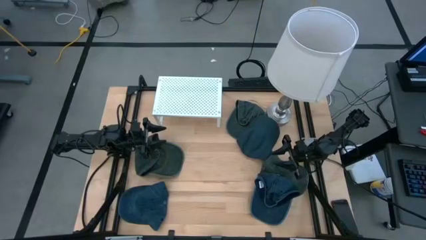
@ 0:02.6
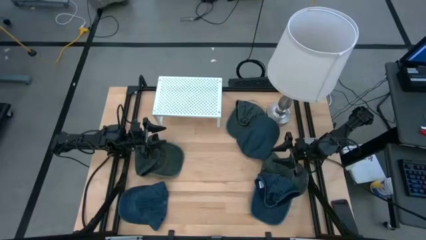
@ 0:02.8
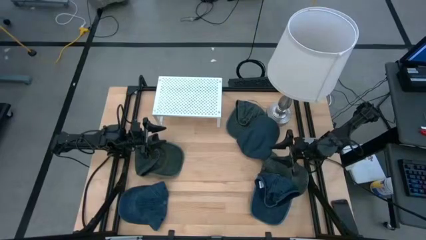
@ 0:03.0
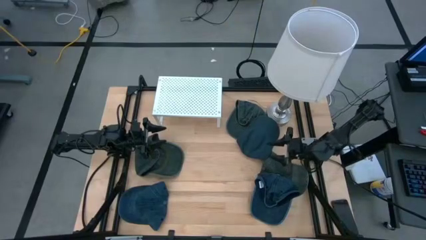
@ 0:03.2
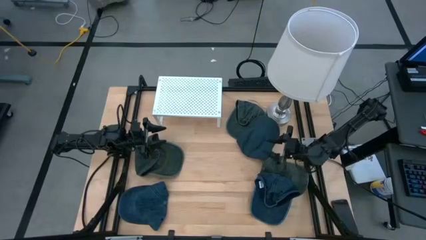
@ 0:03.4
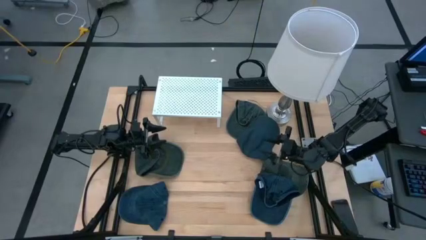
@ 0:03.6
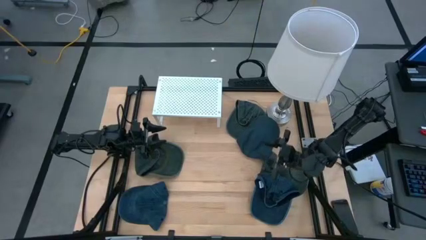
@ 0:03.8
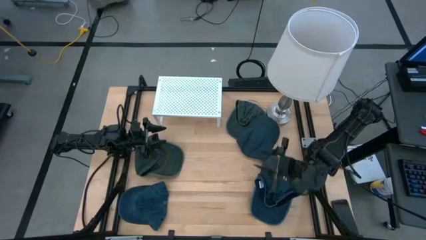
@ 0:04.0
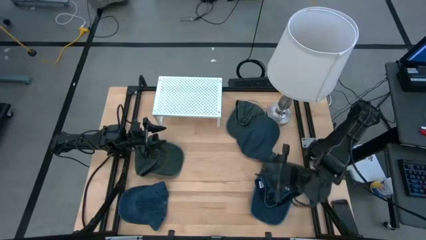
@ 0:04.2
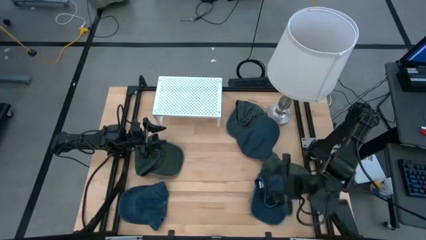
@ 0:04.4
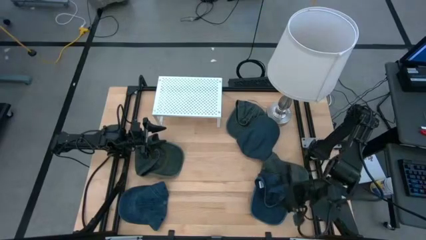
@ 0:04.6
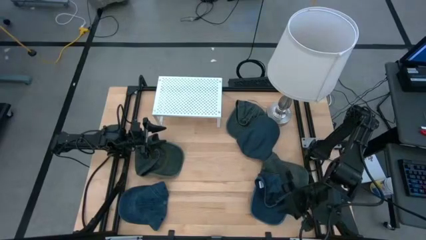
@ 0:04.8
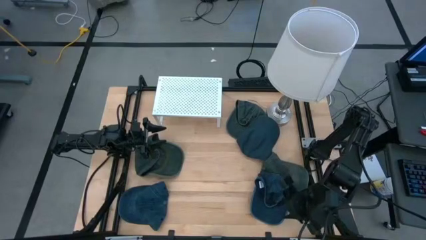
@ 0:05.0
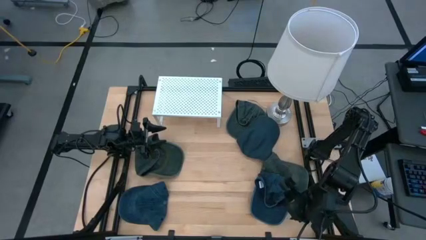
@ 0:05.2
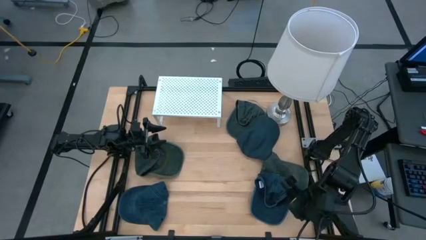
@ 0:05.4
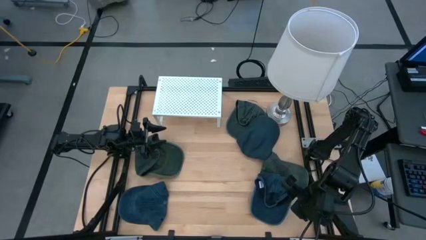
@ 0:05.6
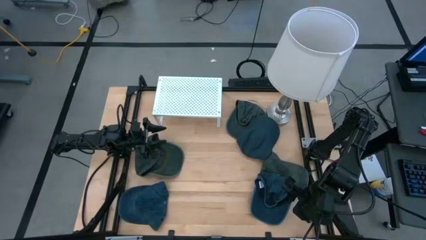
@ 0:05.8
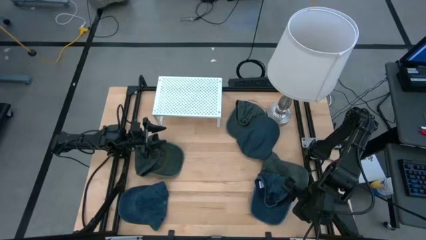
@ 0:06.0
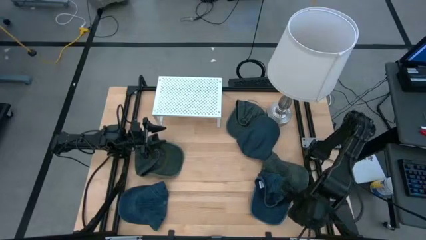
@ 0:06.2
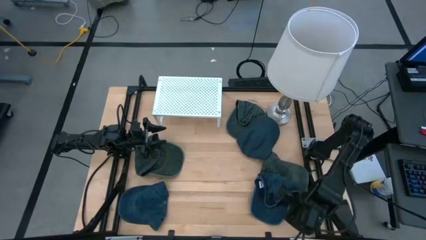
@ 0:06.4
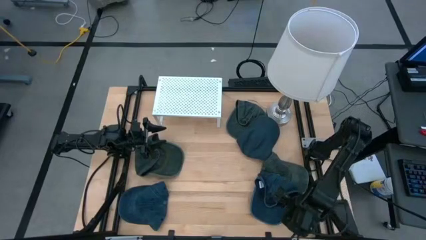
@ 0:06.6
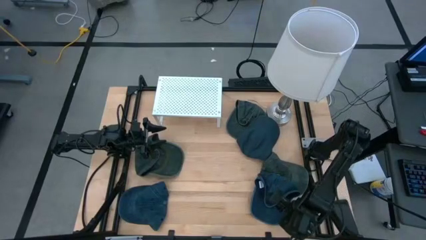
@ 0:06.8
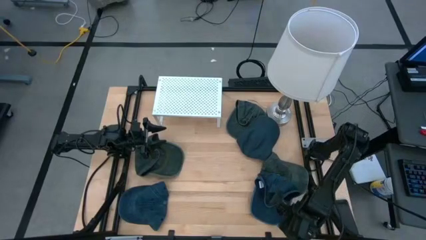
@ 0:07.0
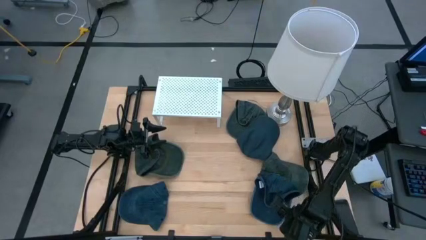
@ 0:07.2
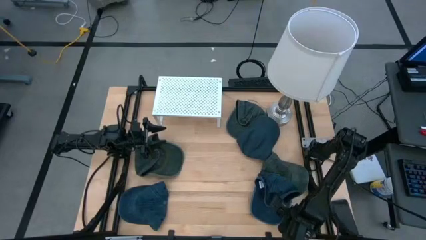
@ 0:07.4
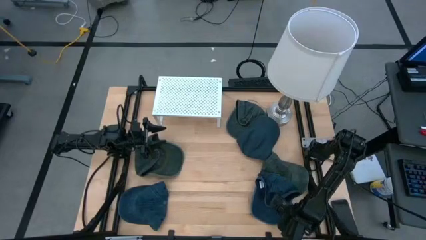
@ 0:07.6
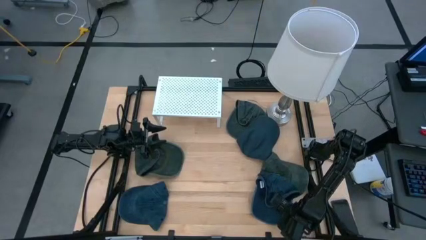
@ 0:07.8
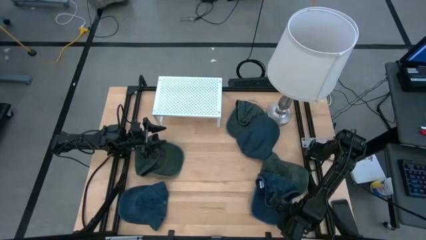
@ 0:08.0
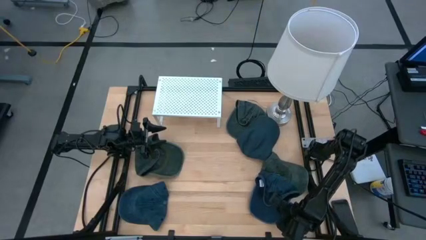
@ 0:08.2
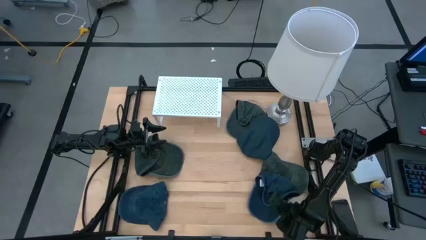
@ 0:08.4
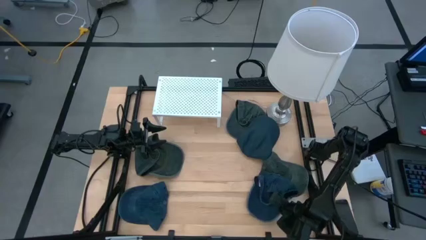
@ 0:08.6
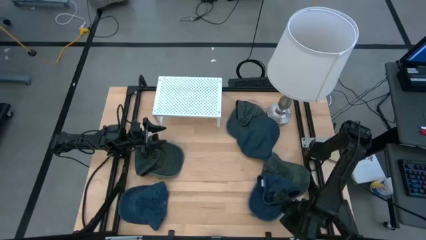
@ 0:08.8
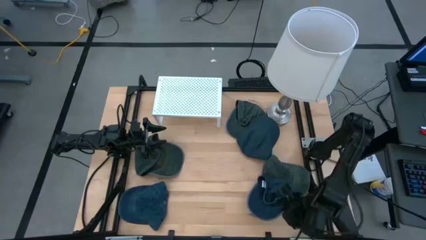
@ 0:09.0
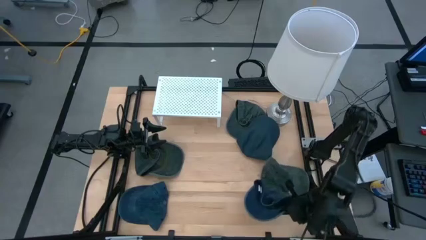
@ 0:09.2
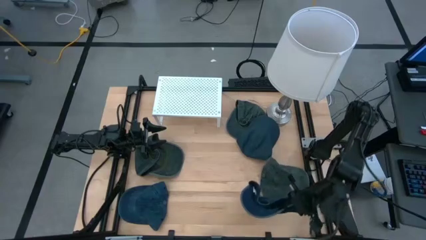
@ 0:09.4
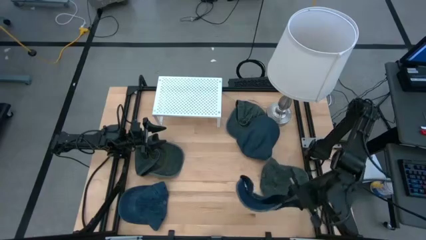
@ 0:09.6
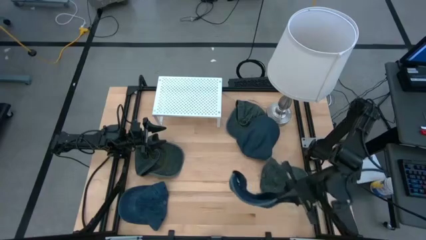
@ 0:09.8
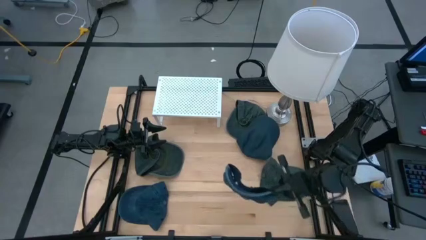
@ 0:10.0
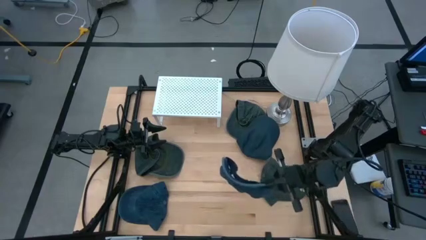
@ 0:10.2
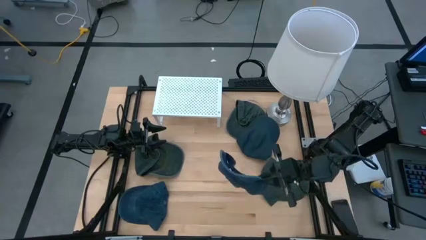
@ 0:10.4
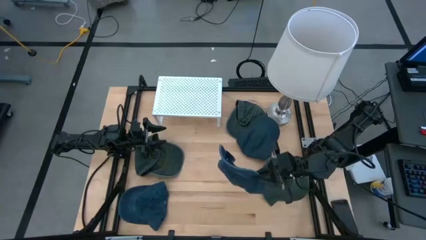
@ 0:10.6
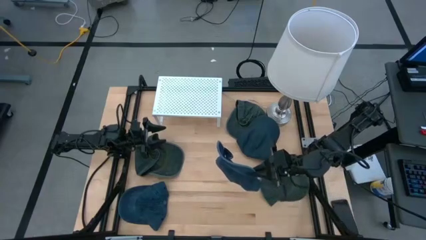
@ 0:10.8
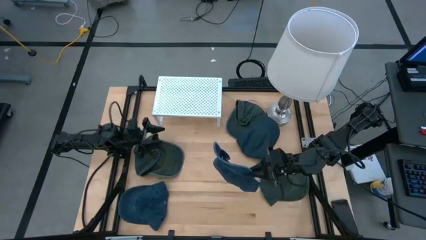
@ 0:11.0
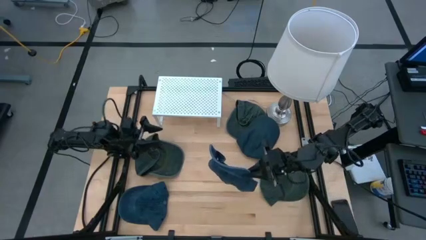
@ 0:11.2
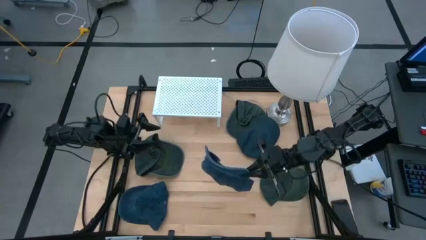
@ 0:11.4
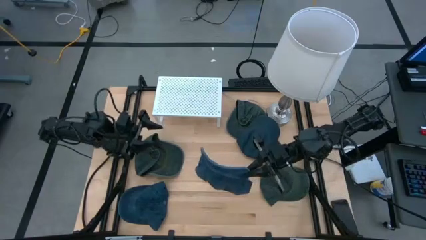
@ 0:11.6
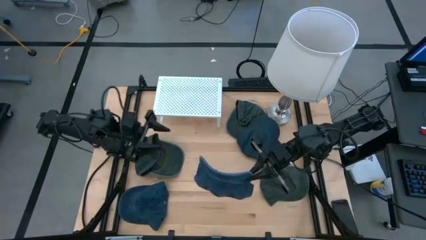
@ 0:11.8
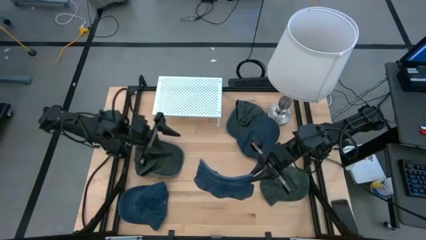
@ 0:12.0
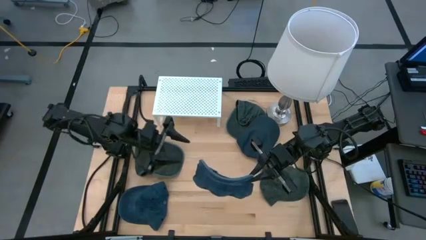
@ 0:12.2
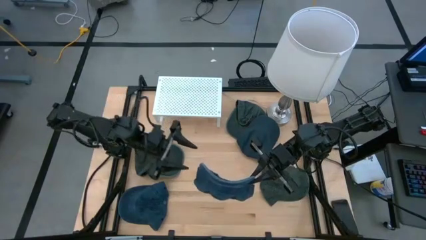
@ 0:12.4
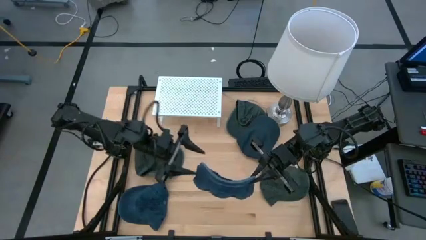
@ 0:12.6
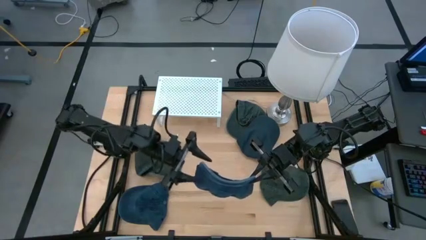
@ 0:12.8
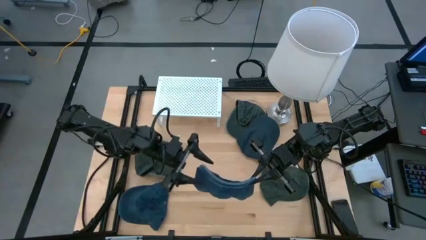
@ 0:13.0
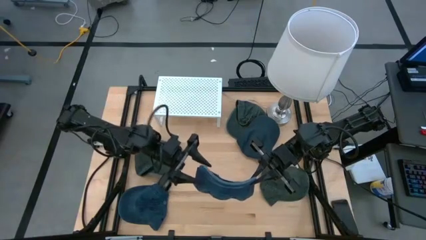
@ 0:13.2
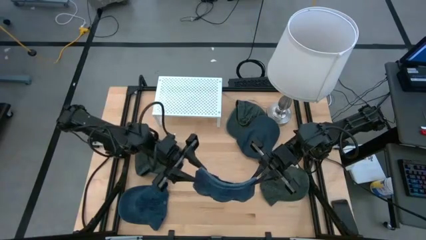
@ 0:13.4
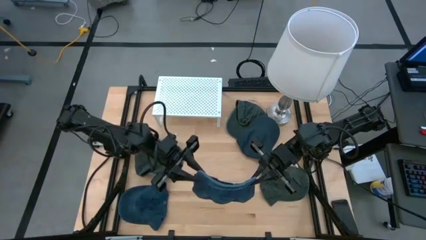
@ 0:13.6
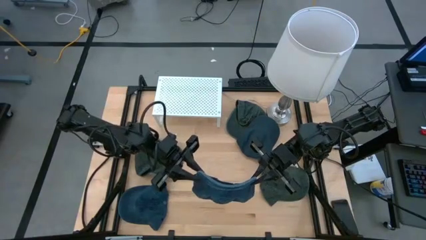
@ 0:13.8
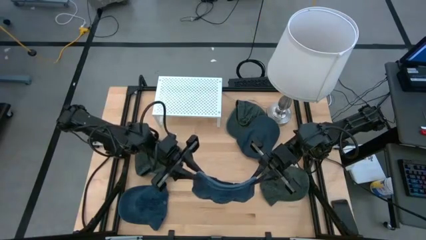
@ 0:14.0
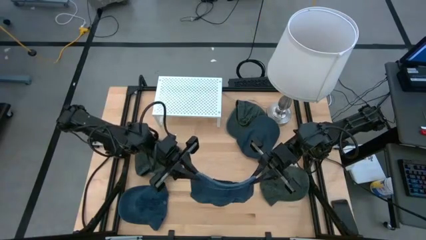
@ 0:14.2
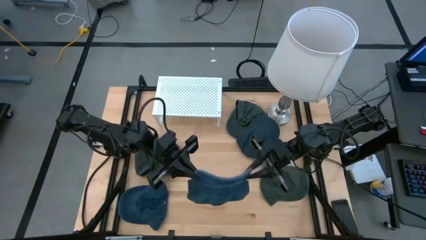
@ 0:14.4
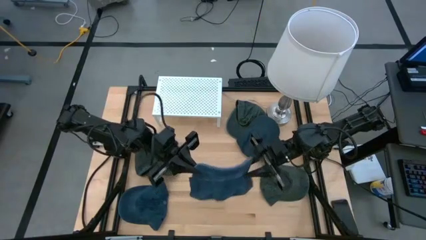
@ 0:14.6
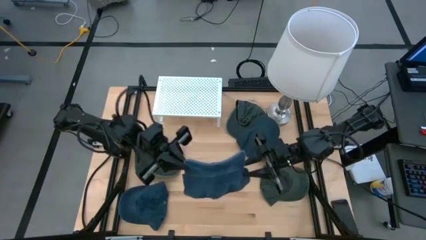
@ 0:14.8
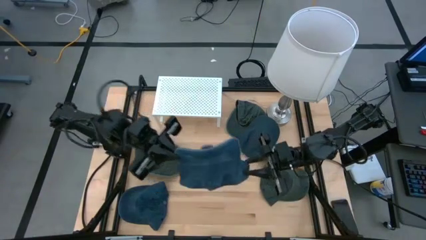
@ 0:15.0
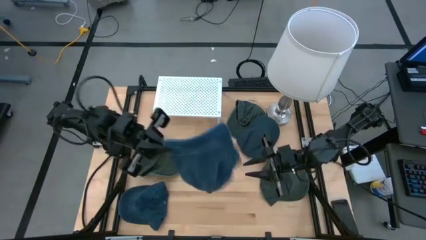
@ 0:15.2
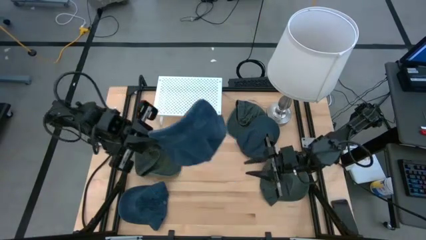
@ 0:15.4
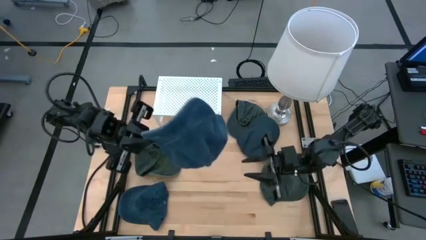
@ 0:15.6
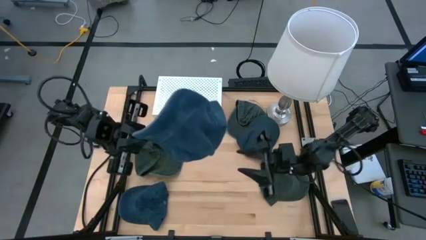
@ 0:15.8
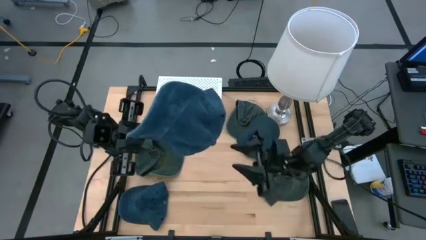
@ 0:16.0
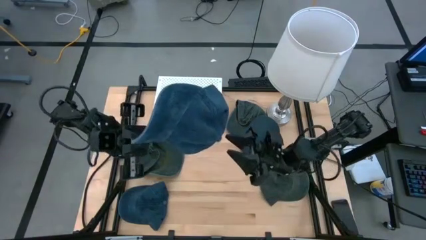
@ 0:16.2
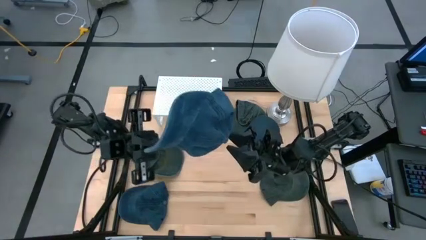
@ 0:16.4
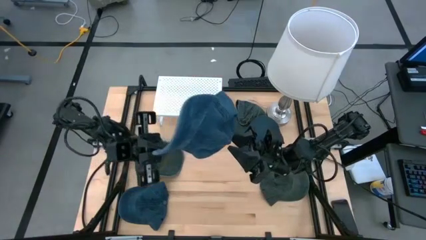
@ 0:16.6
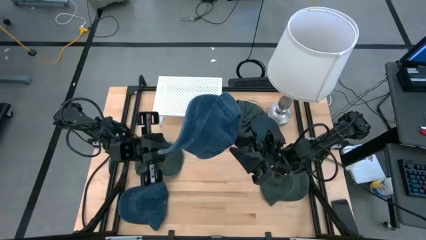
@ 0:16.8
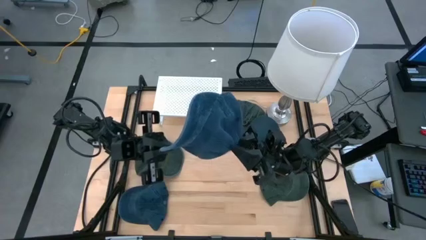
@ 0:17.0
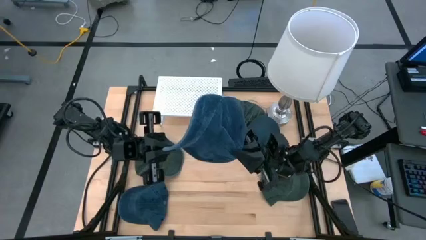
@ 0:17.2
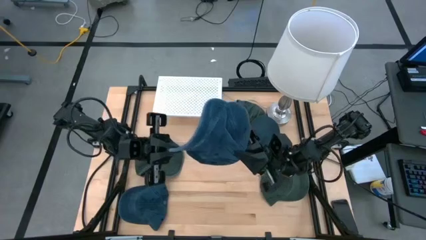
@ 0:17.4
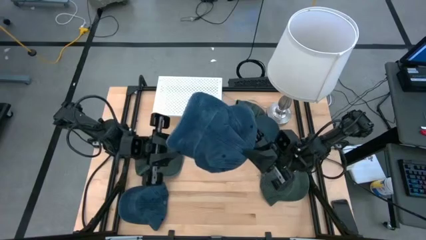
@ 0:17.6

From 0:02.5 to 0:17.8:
Task: Pick & Place hat
Put the bottom right blue cap on the shelf
